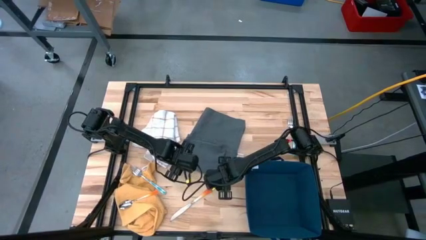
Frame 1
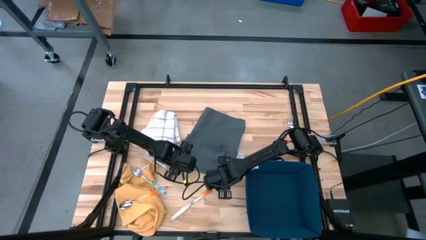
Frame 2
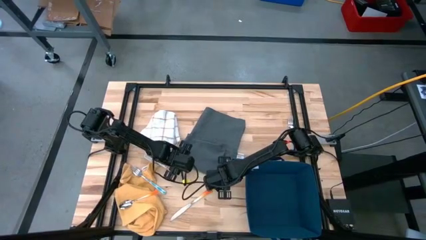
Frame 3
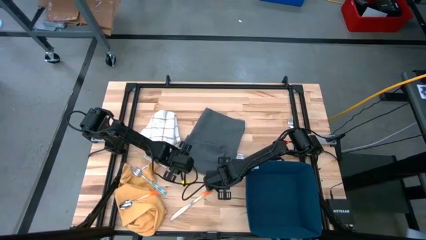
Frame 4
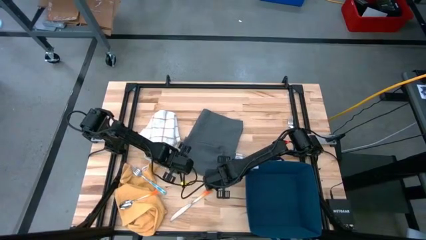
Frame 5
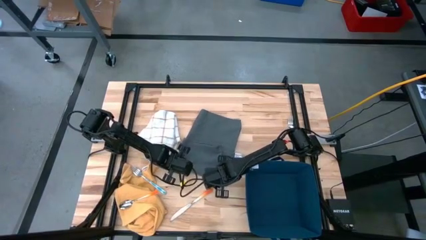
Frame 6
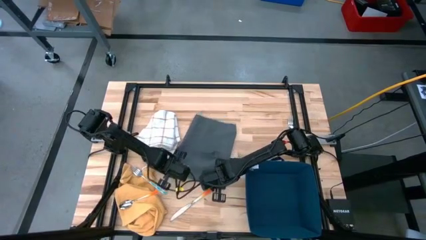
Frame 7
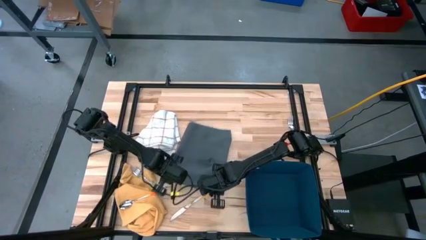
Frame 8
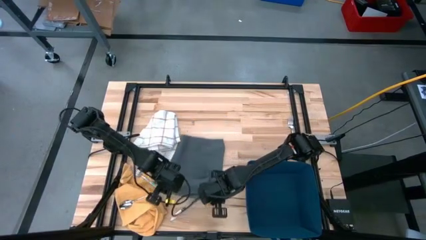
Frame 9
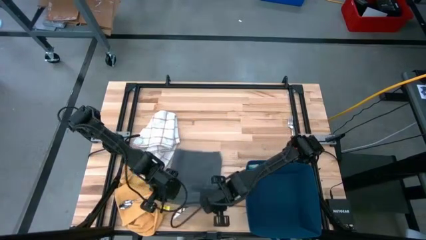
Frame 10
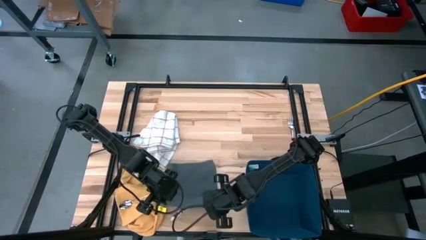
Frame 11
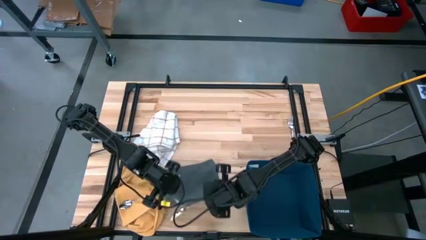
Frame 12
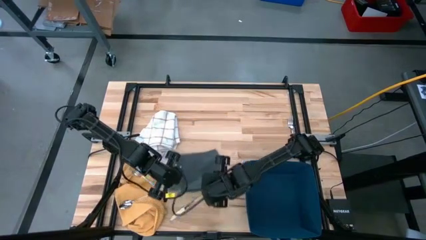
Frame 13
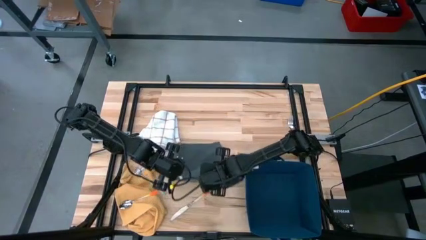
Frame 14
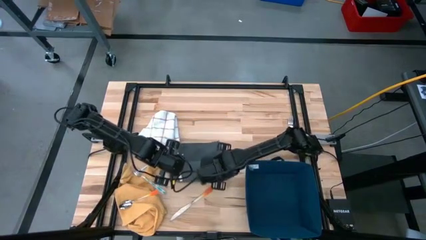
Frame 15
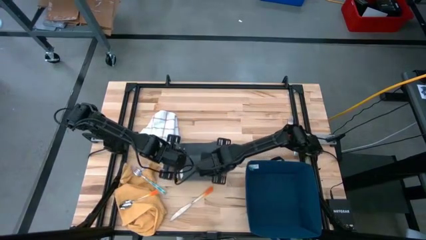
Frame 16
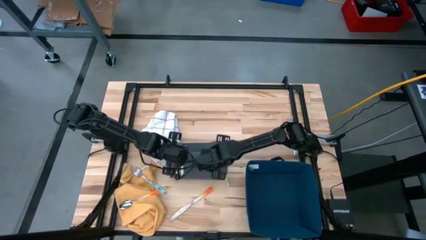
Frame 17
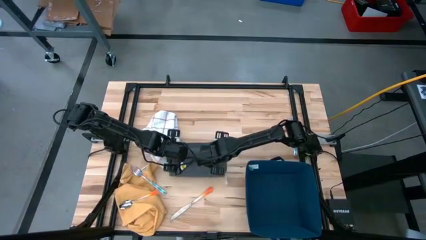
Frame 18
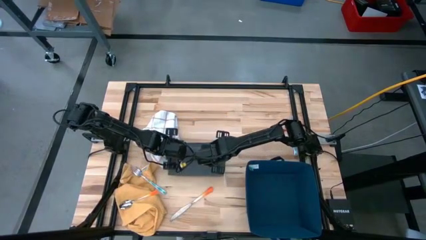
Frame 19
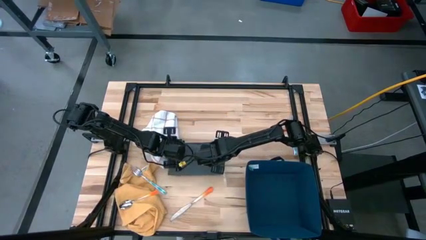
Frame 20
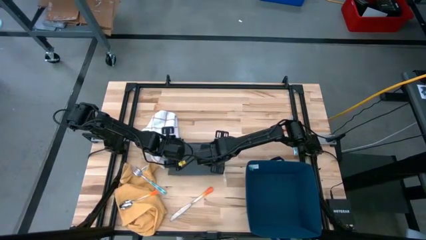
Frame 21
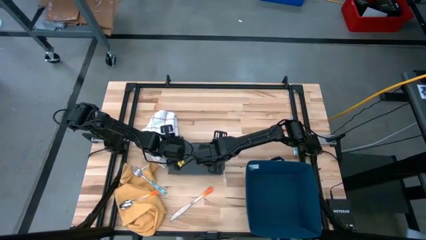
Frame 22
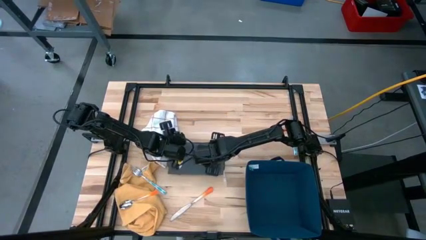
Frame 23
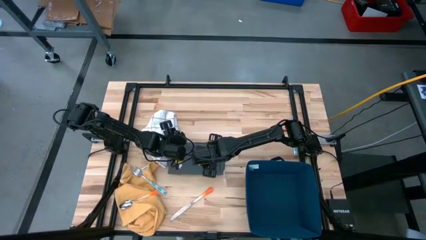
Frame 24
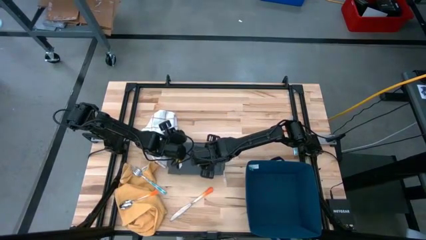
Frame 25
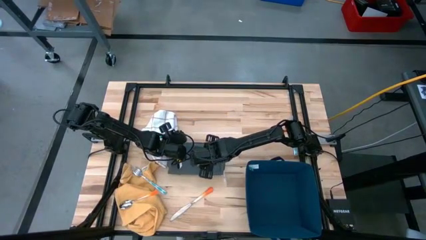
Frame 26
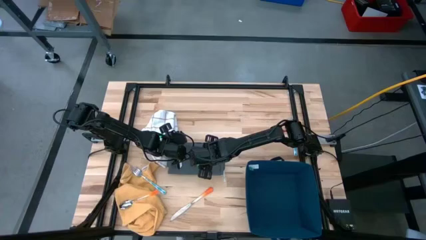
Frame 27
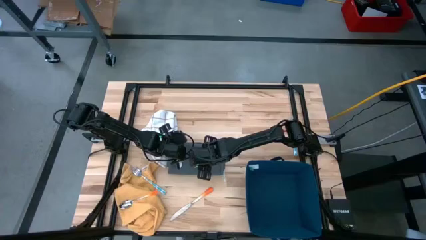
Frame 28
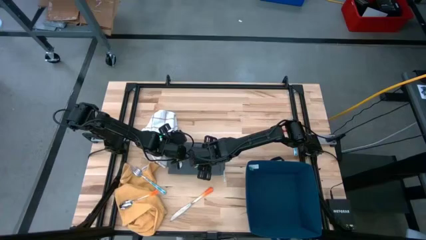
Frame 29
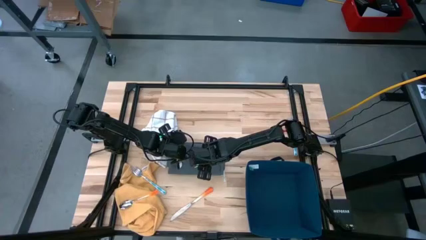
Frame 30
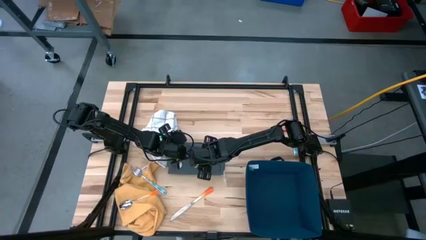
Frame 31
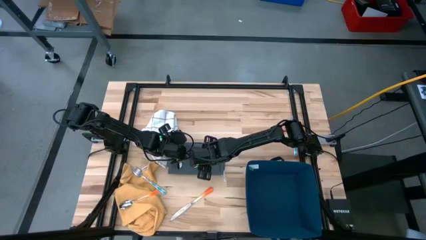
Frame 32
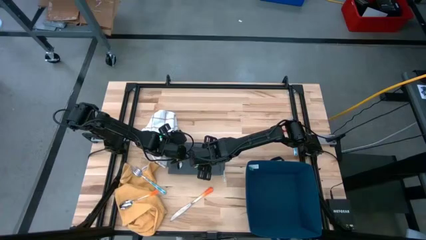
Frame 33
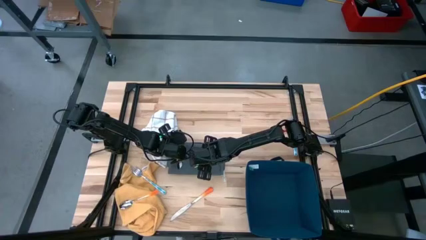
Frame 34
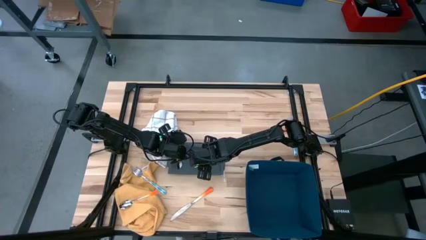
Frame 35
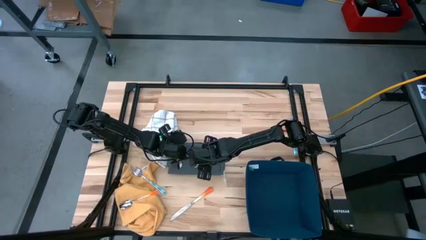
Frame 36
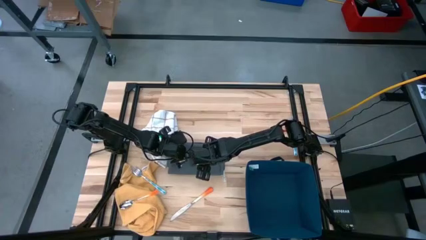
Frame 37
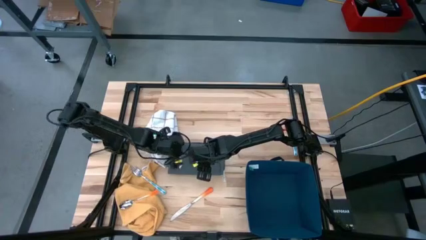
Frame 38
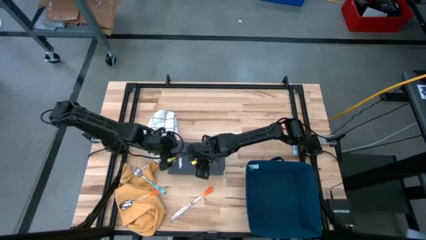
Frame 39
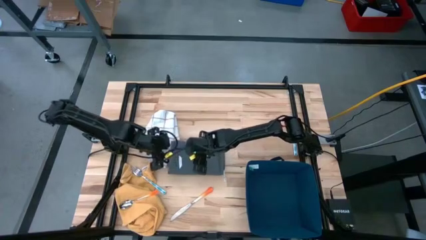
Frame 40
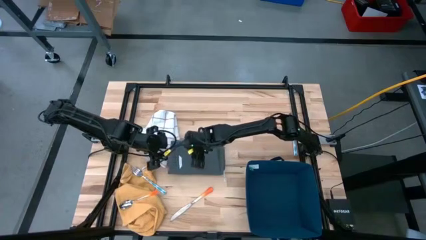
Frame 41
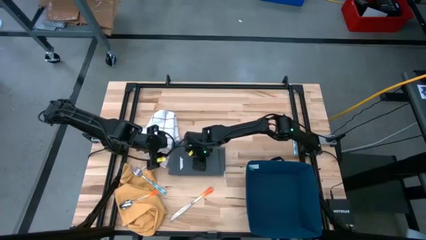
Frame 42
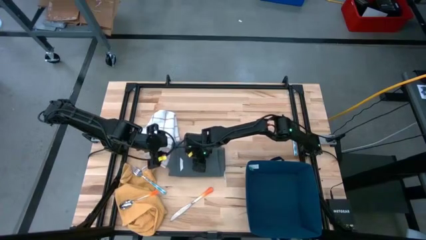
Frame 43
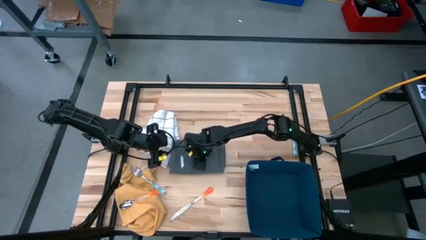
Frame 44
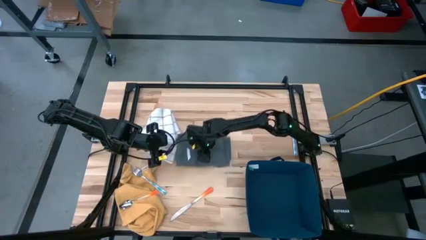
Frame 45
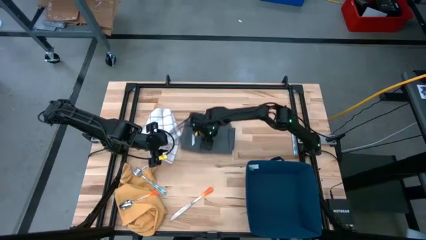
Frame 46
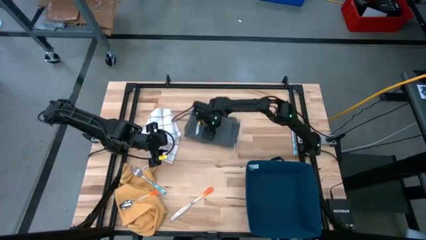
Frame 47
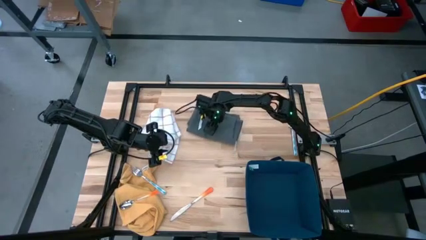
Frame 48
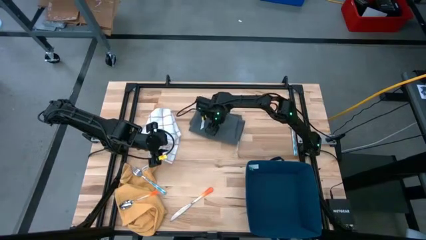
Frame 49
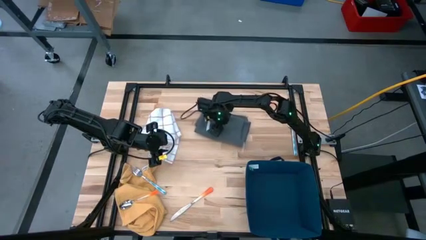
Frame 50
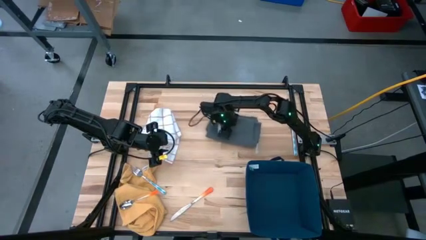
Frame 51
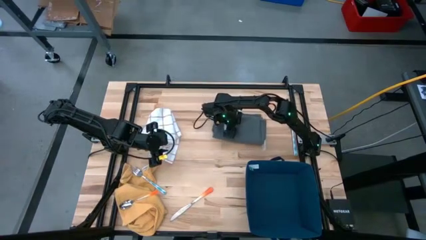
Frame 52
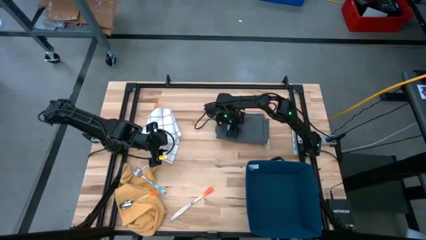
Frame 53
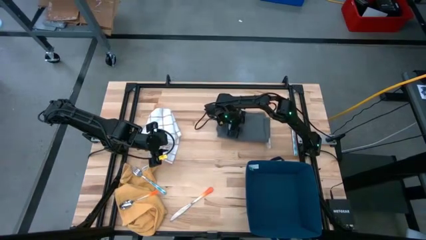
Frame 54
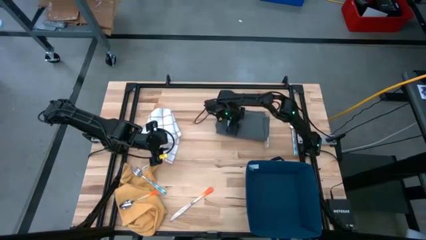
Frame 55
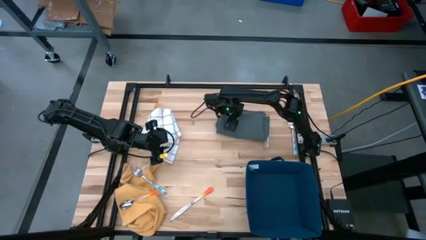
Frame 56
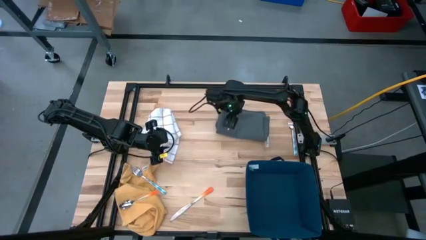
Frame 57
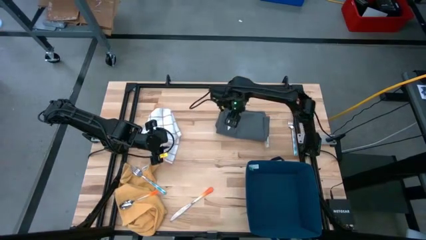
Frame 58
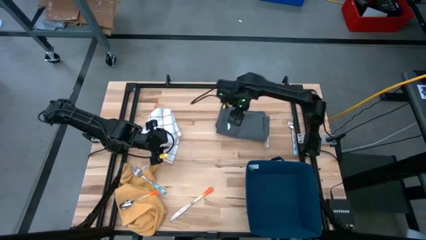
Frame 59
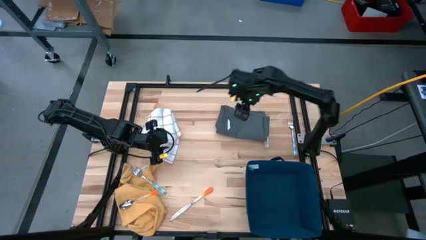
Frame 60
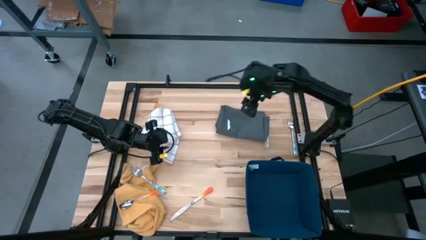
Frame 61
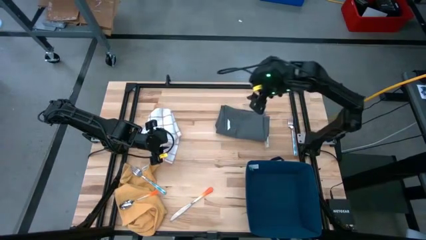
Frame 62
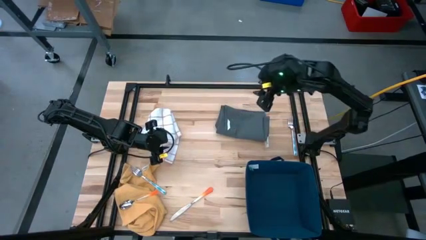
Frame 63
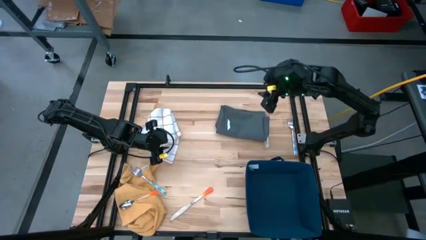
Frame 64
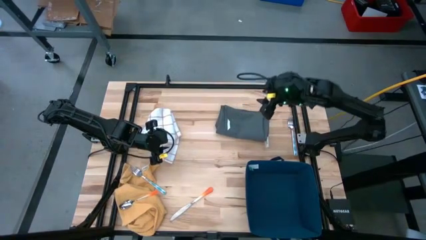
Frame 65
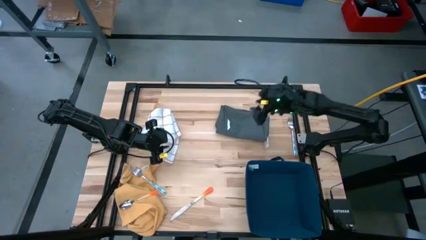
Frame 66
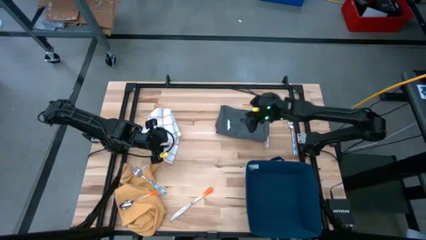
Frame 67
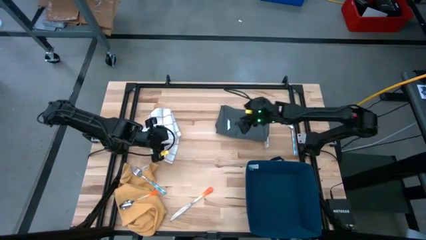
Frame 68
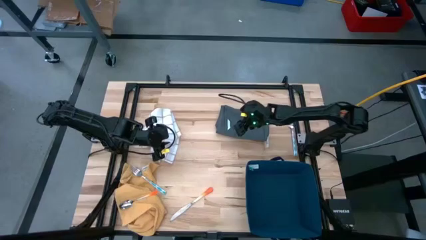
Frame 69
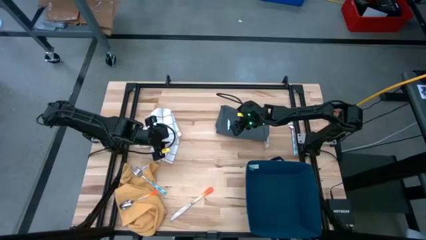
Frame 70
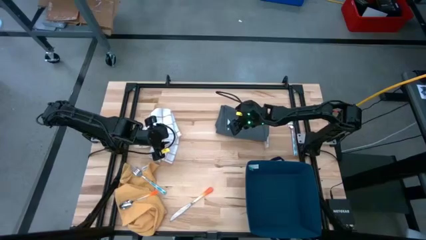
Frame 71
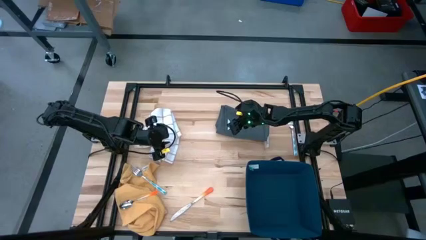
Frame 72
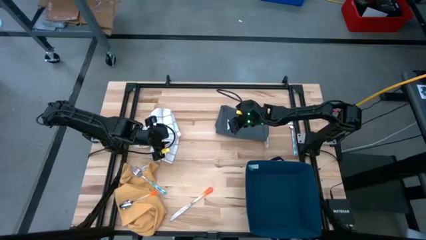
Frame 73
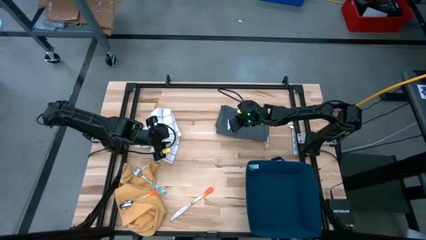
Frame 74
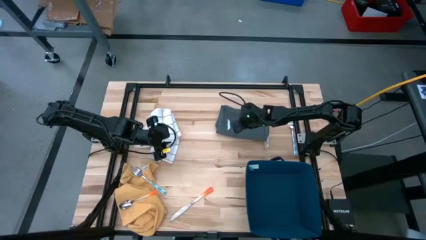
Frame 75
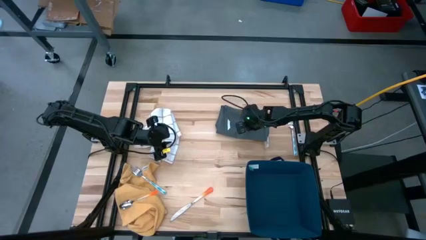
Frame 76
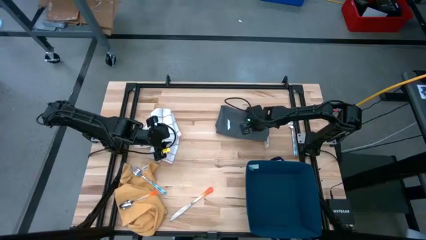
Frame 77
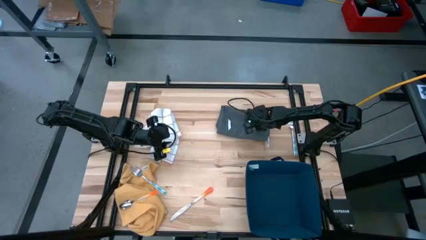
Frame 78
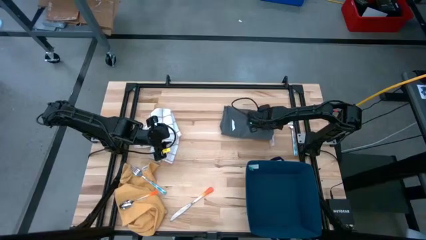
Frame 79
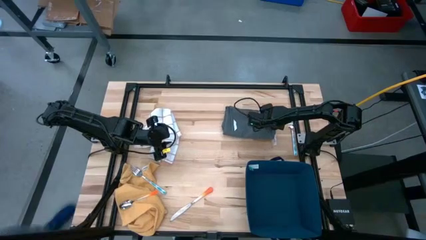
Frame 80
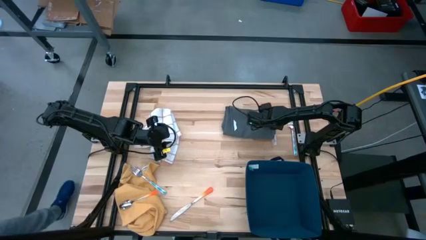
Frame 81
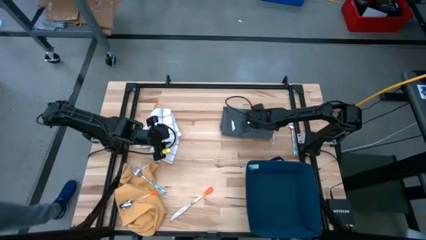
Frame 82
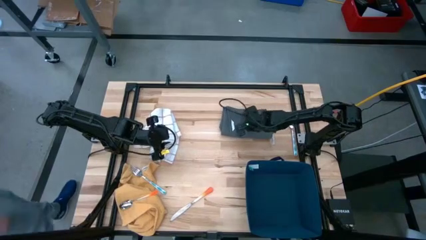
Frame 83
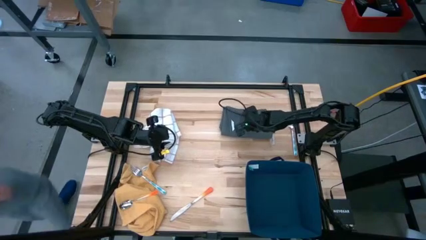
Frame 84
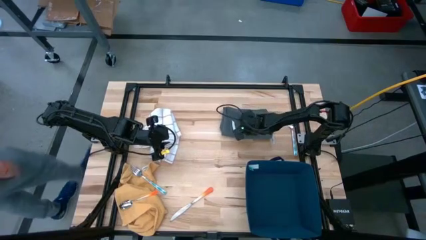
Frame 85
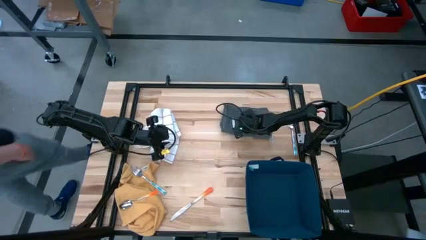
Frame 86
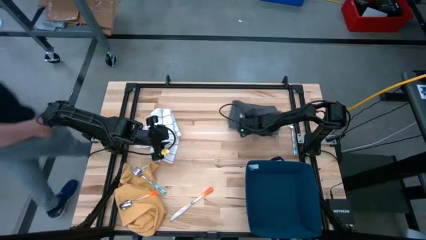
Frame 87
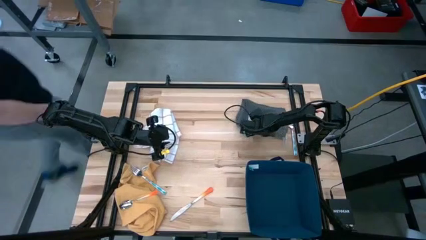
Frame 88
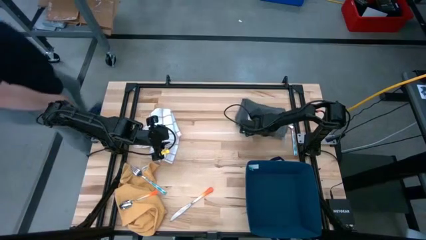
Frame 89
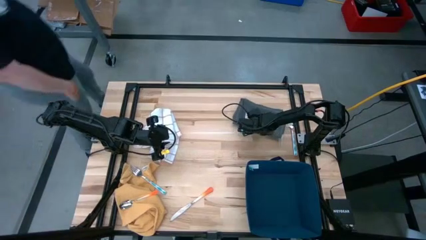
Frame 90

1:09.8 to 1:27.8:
Task: Fold towel
Fold the grey towel
